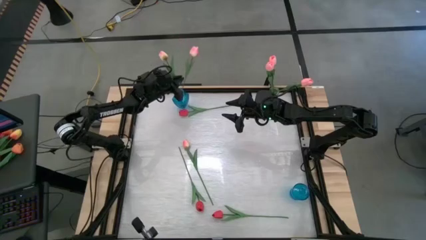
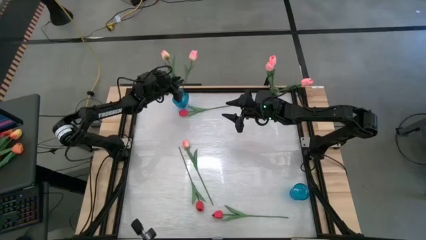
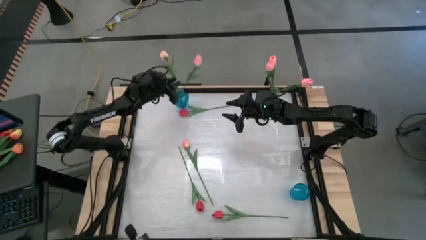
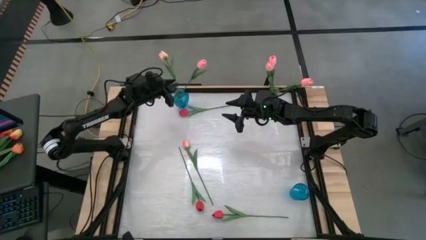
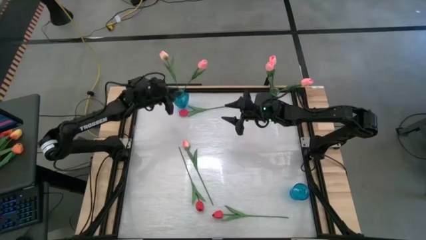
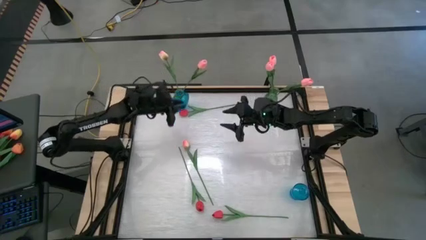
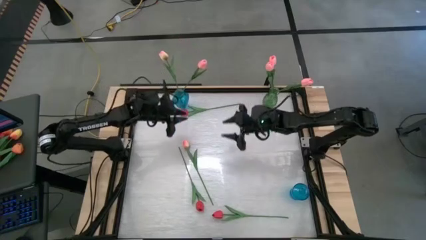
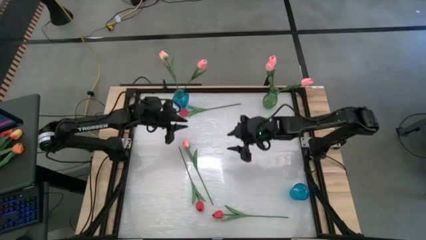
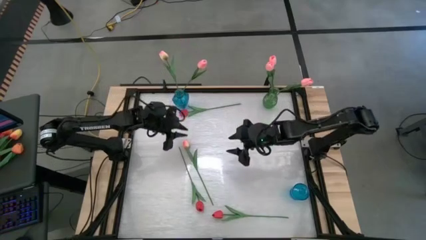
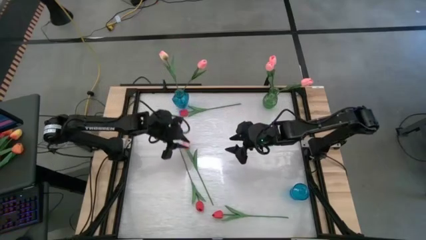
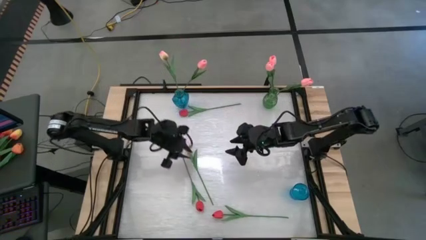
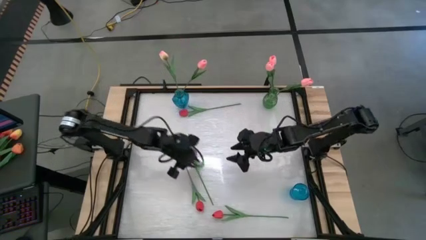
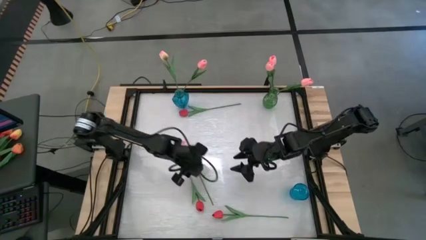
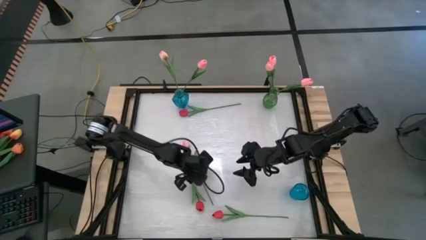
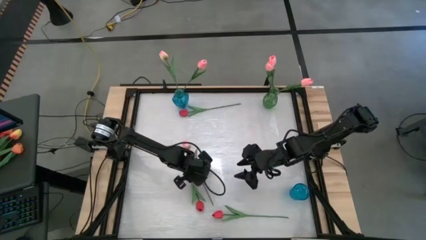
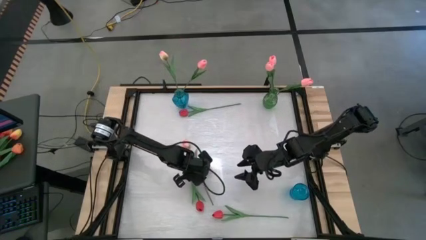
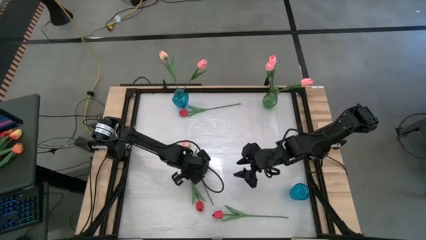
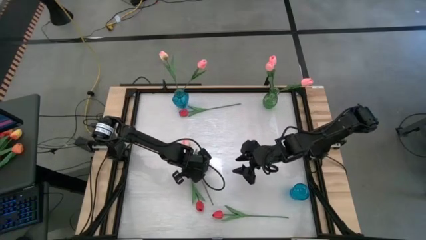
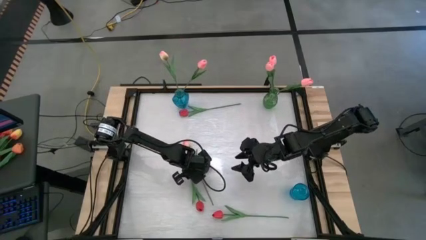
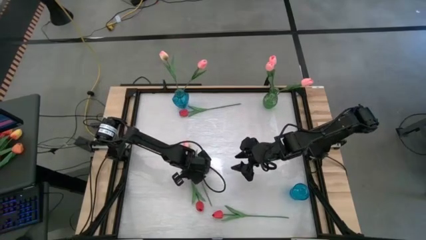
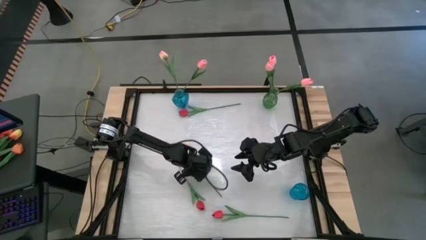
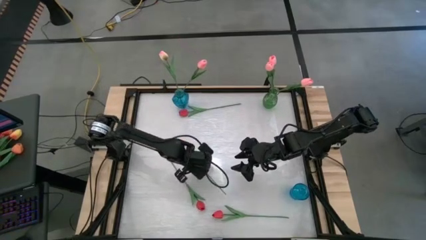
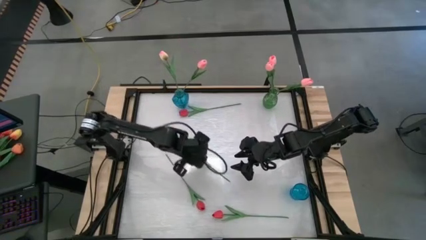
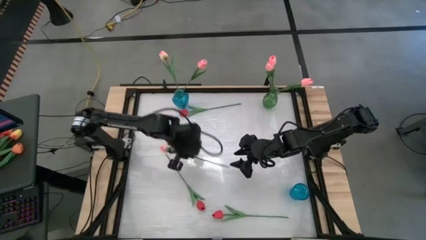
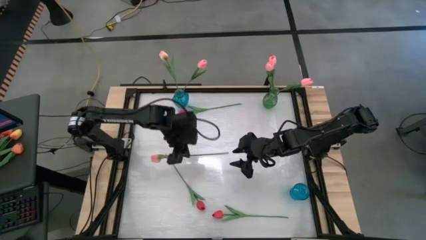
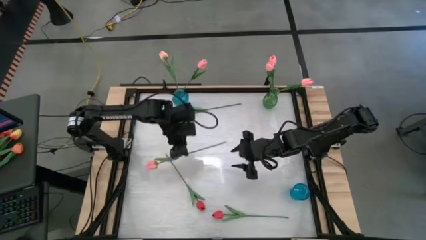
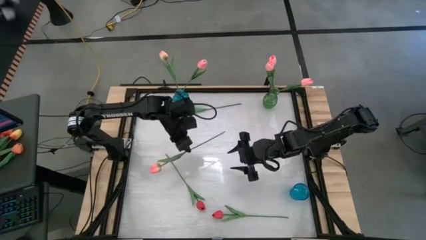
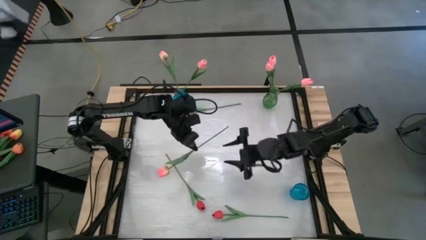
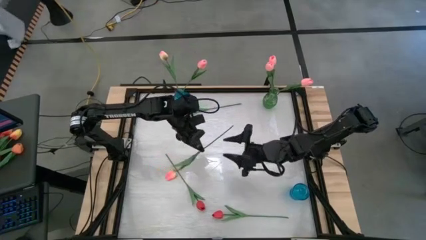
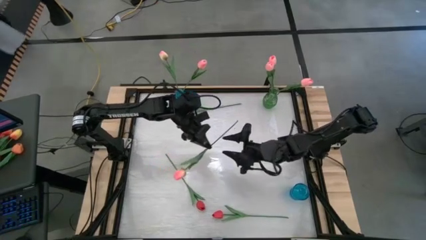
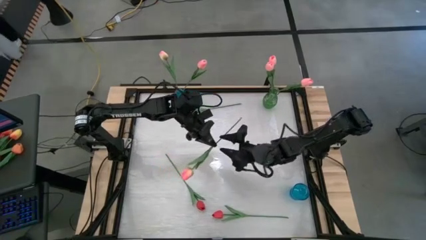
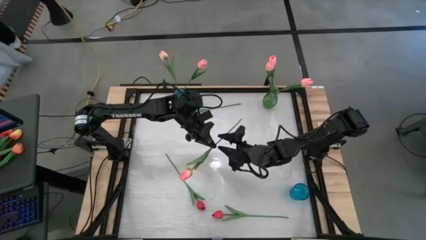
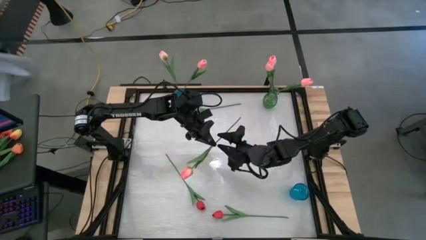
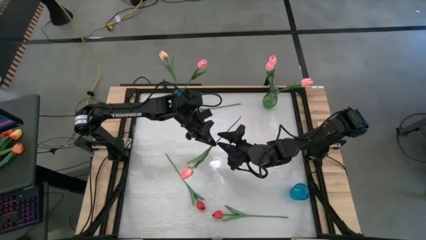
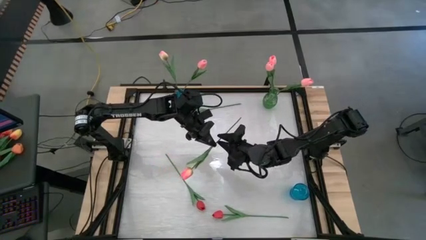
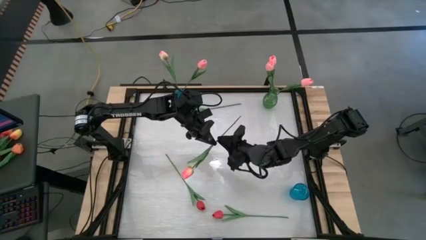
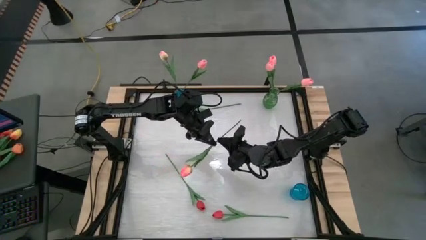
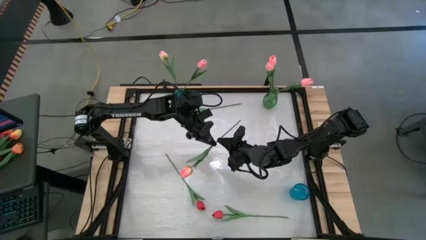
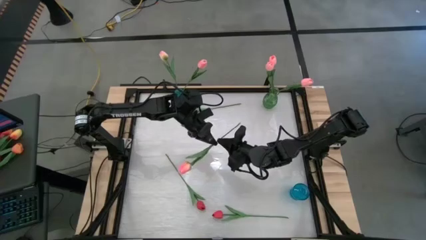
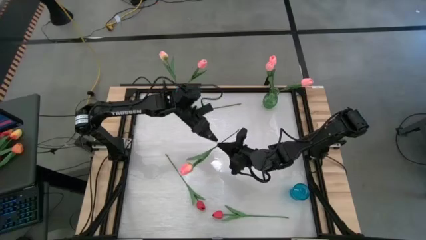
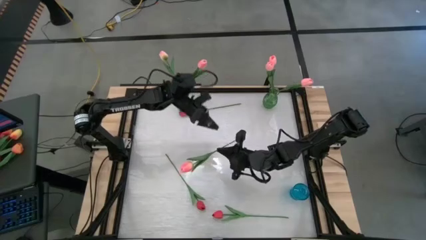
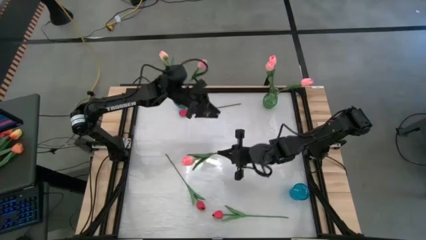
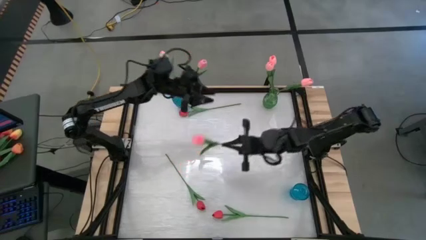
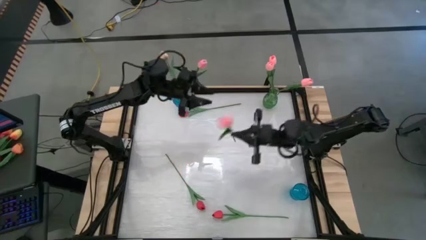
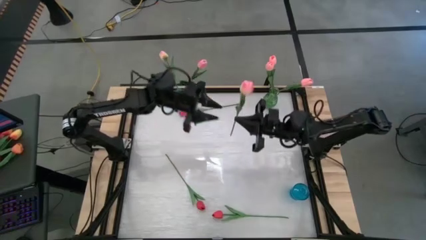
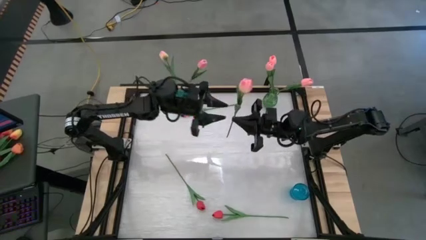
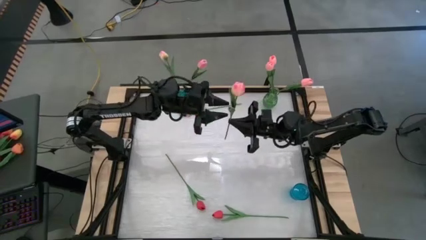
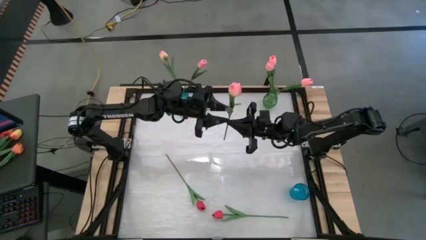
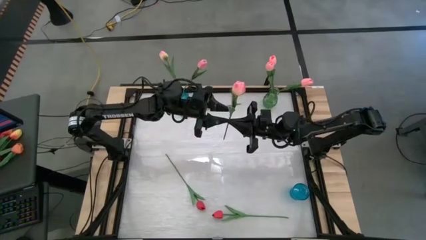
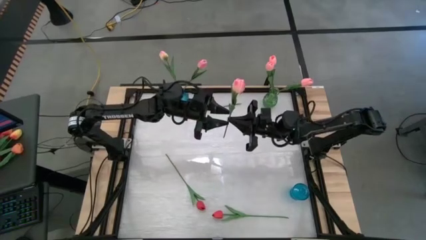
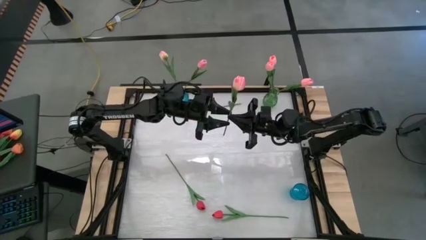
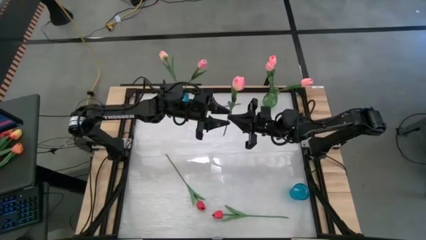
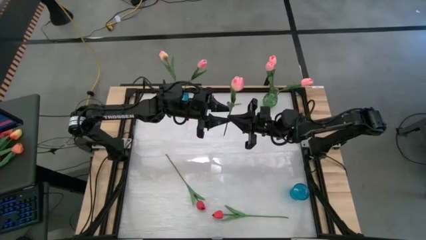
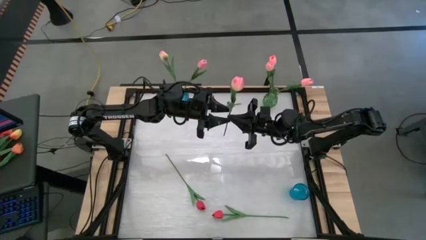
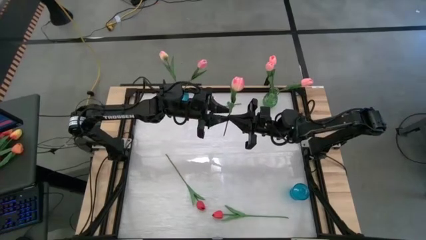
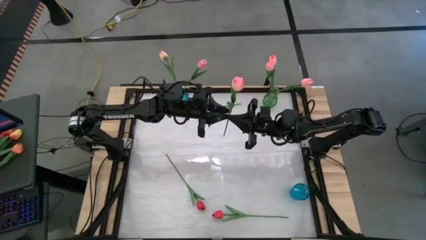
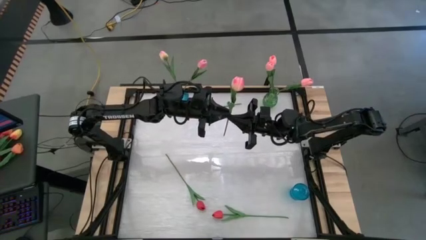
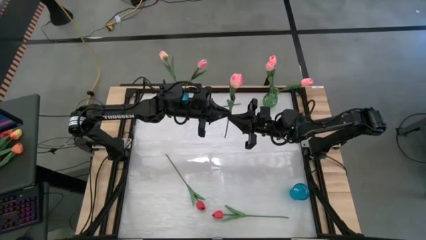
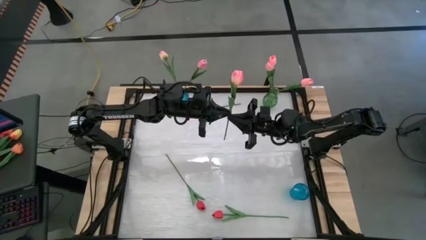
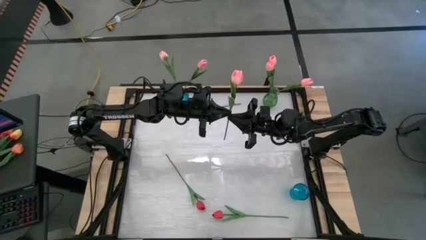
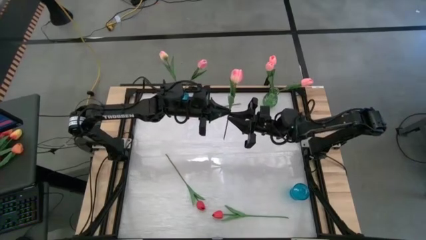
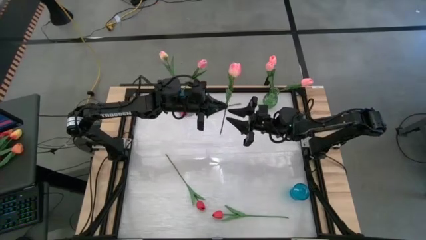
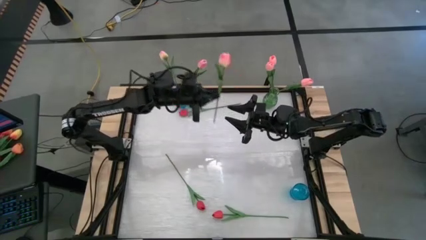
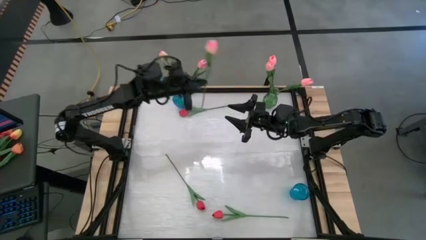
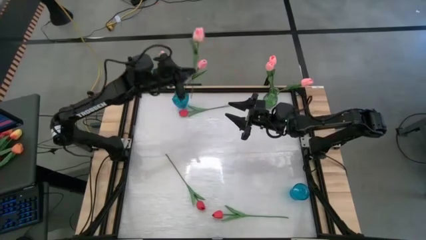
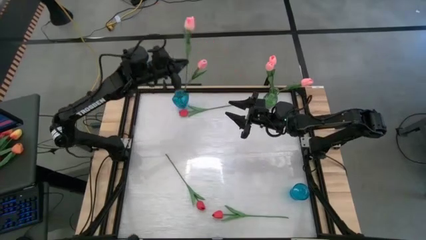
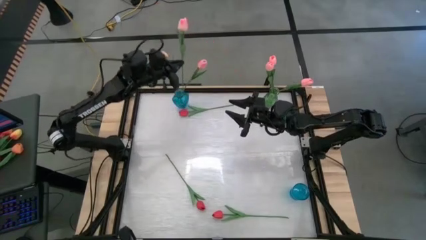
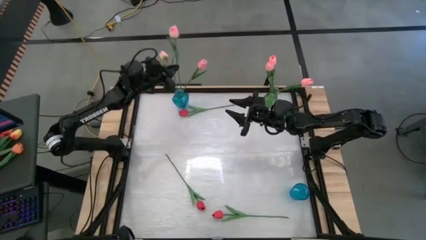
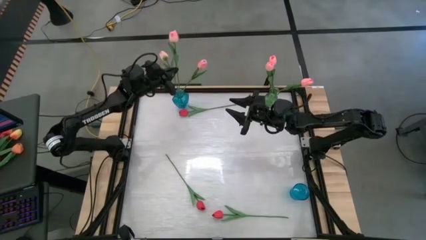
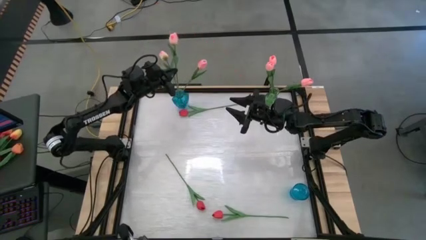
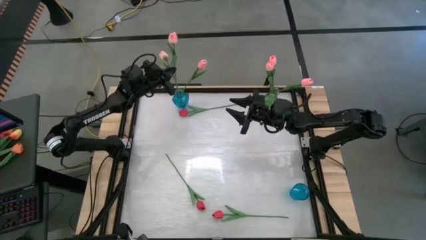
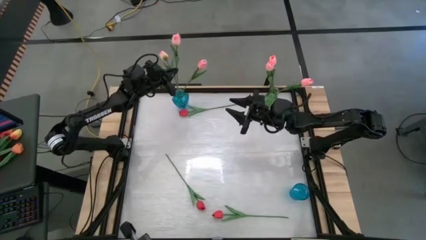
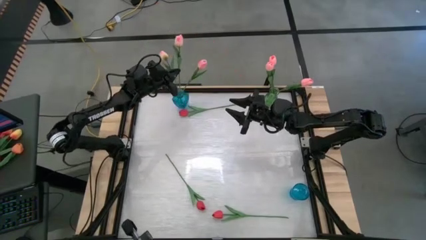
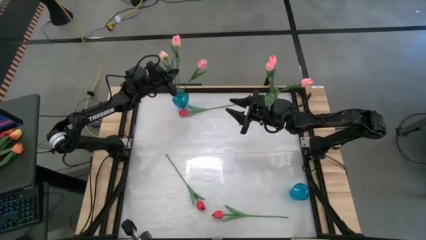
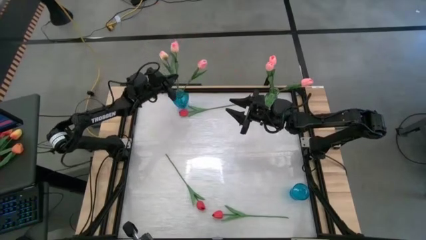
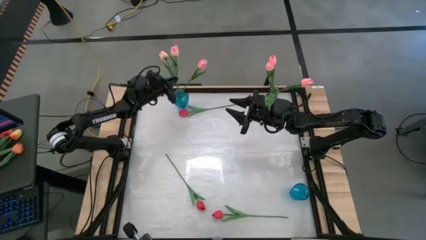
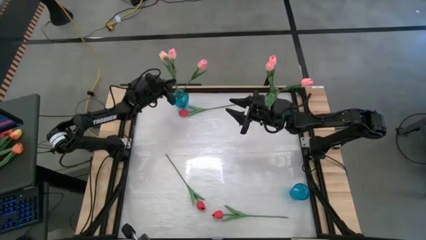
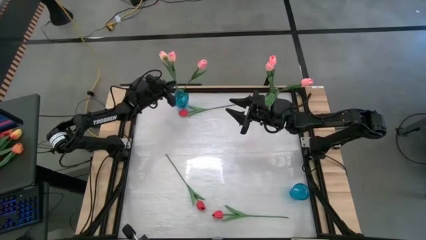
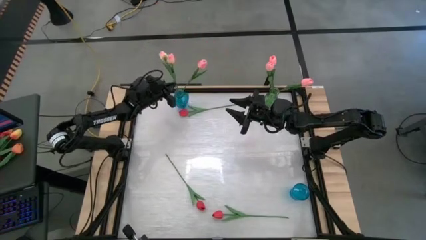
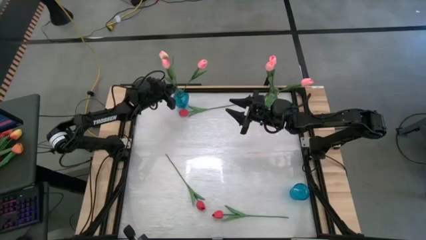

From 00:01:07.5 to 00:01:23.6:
Task: Sort flowers into vase by color
Put the light pink flower into the top blue vase
